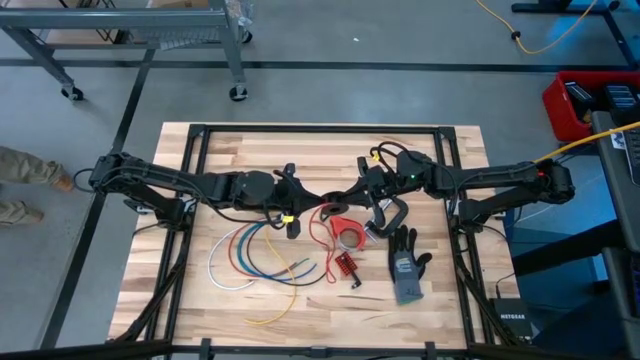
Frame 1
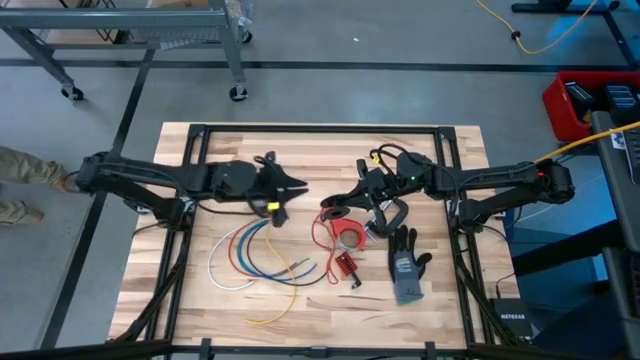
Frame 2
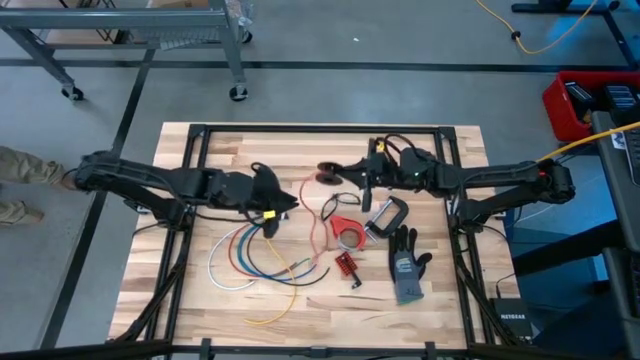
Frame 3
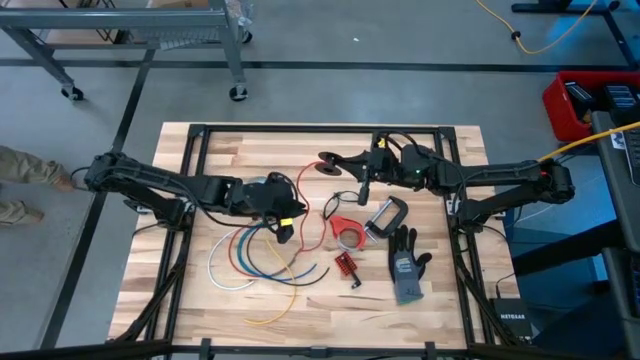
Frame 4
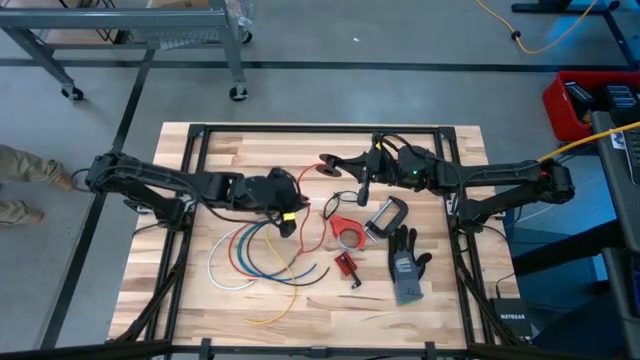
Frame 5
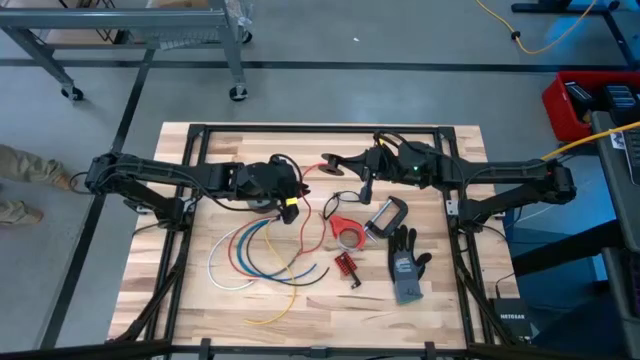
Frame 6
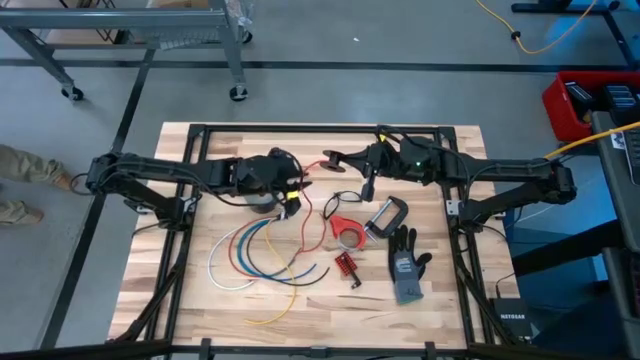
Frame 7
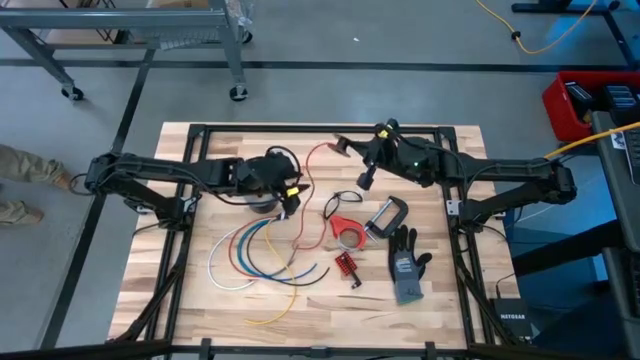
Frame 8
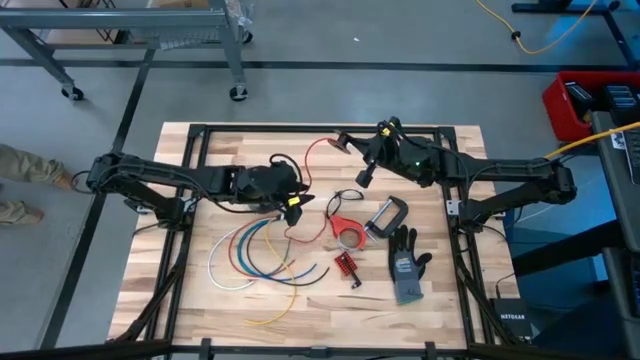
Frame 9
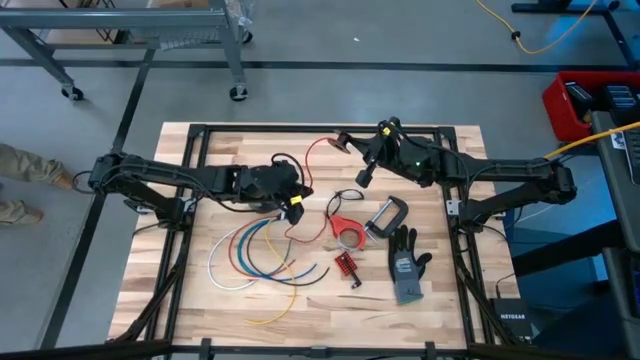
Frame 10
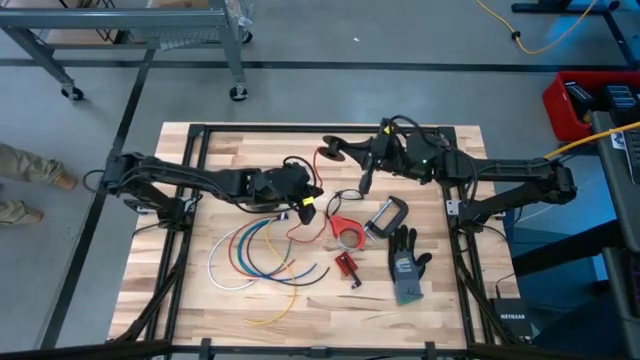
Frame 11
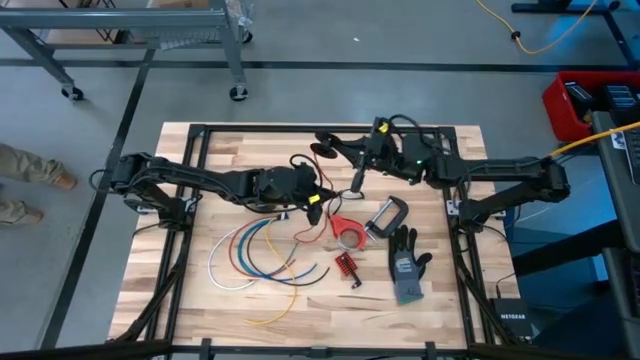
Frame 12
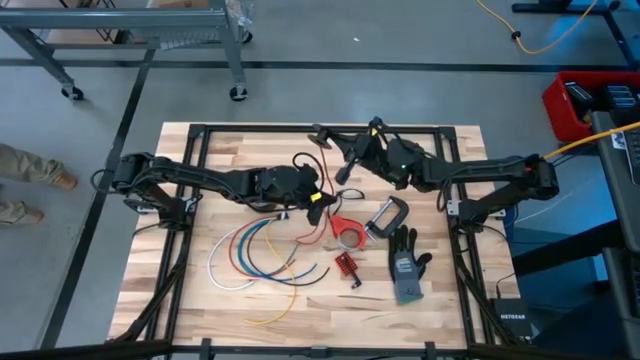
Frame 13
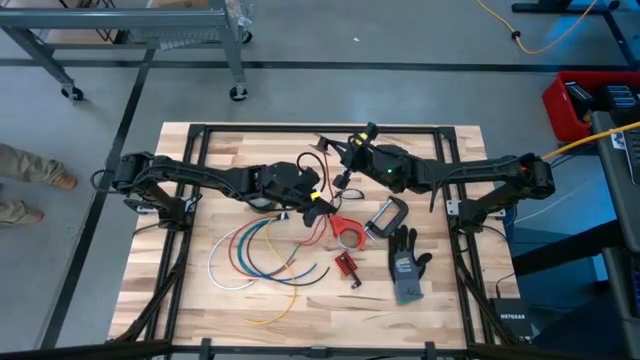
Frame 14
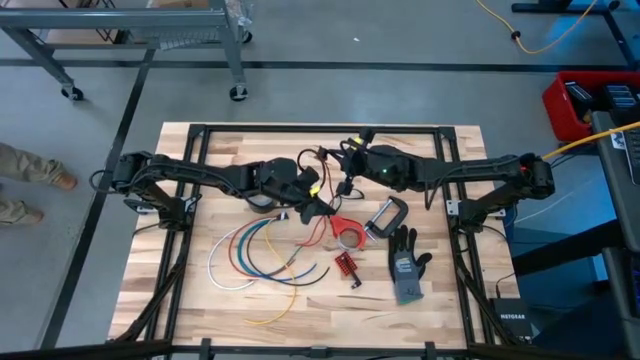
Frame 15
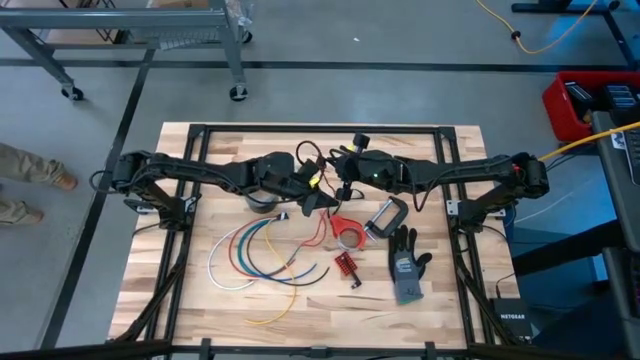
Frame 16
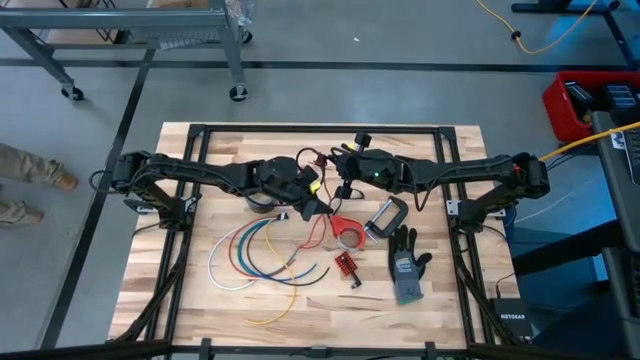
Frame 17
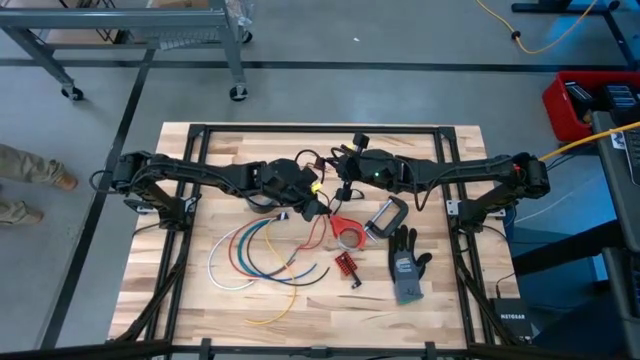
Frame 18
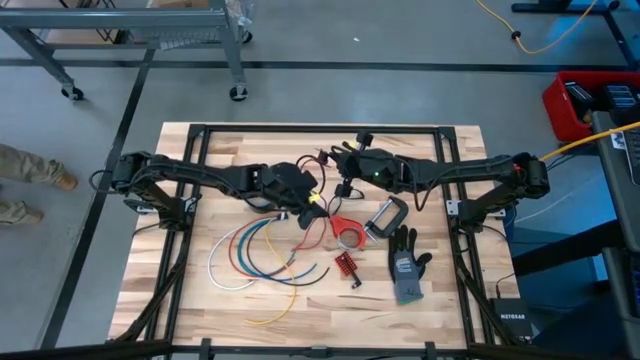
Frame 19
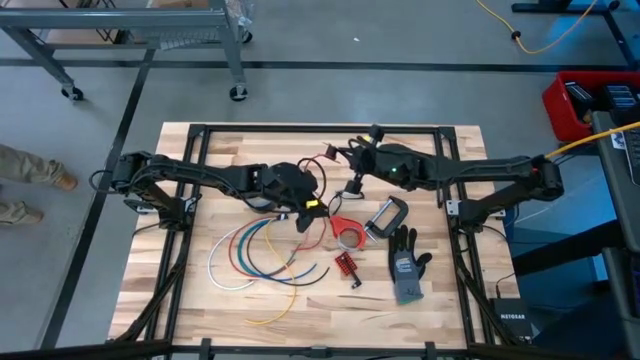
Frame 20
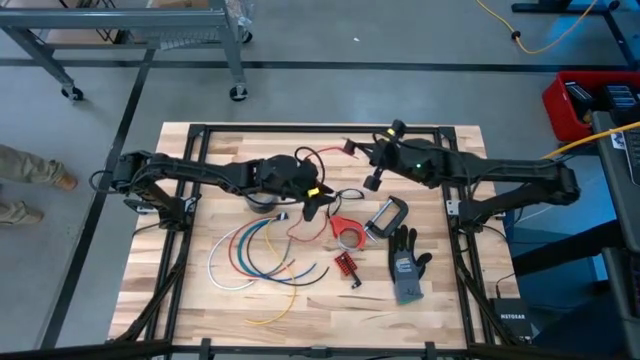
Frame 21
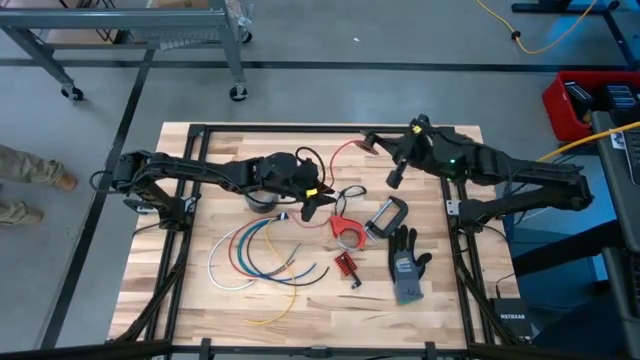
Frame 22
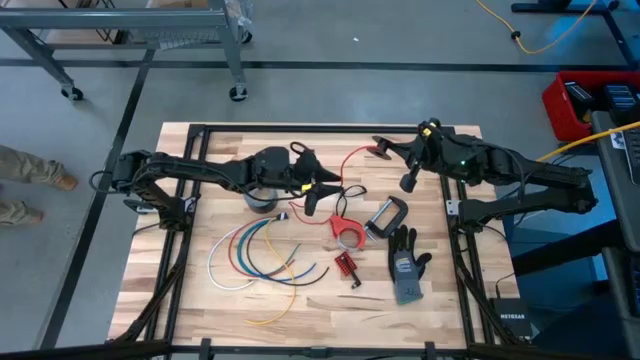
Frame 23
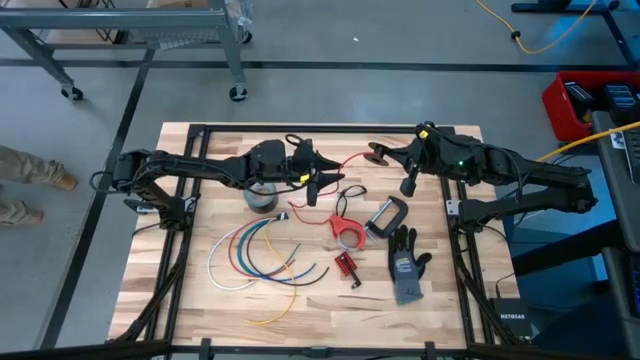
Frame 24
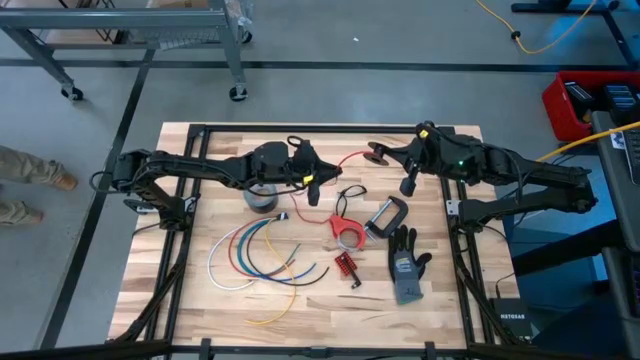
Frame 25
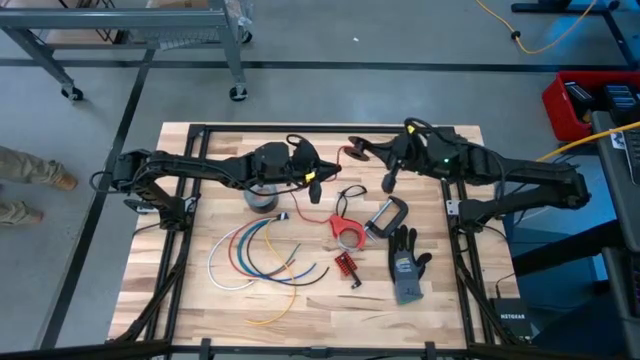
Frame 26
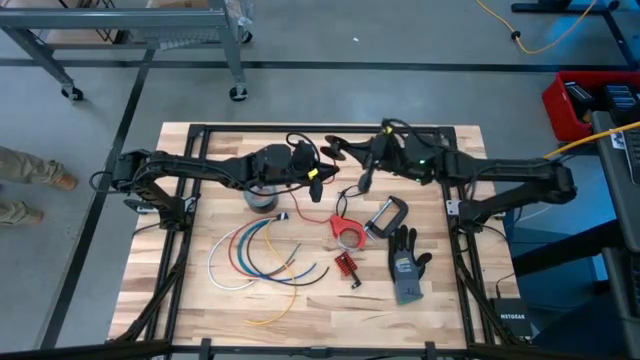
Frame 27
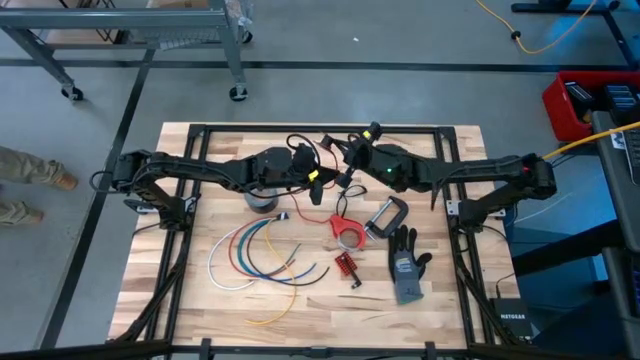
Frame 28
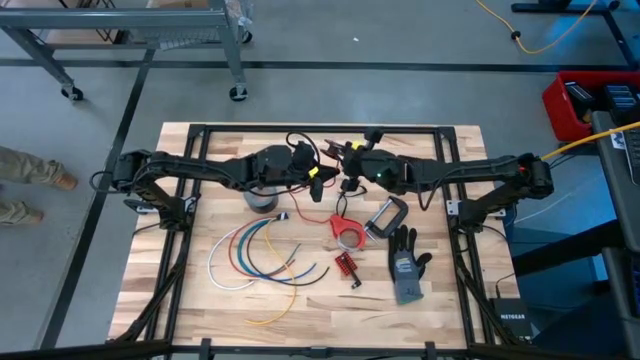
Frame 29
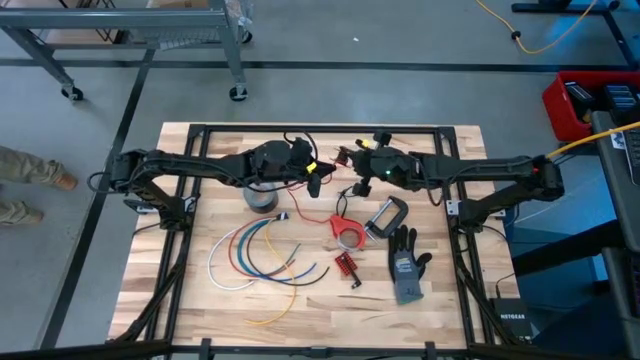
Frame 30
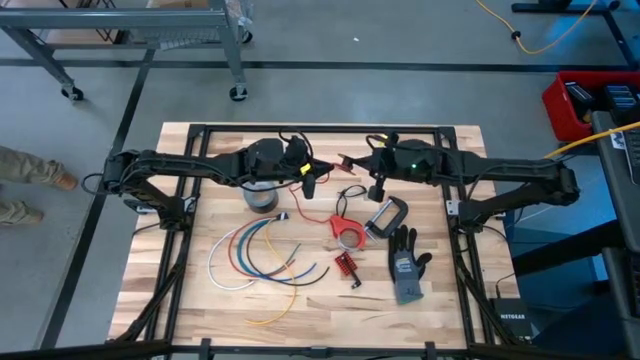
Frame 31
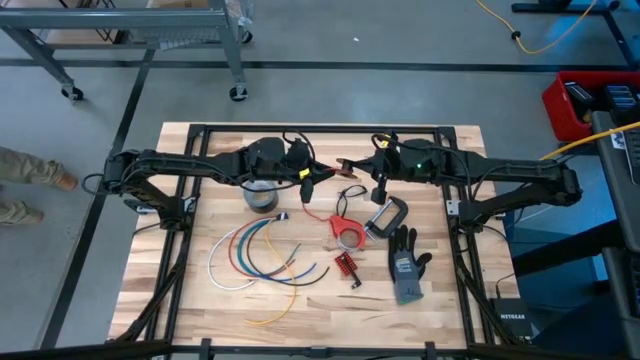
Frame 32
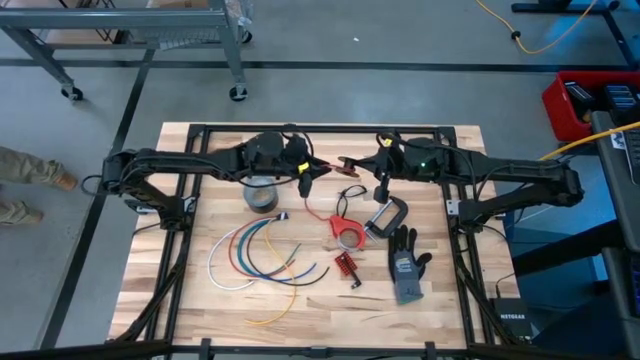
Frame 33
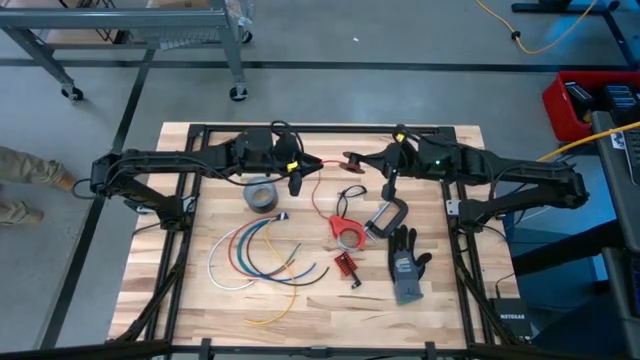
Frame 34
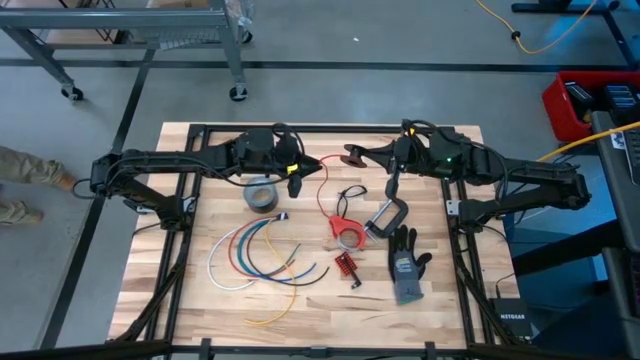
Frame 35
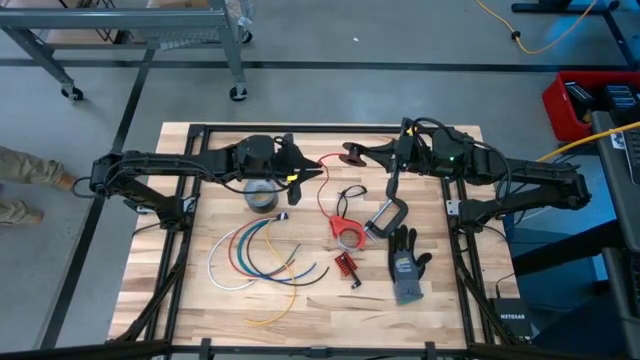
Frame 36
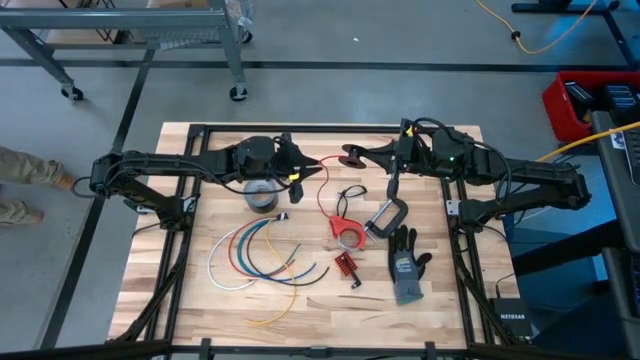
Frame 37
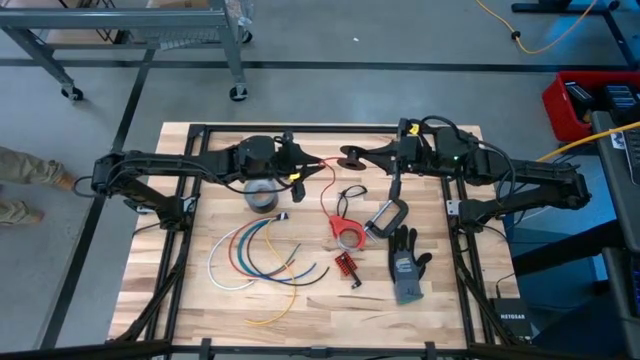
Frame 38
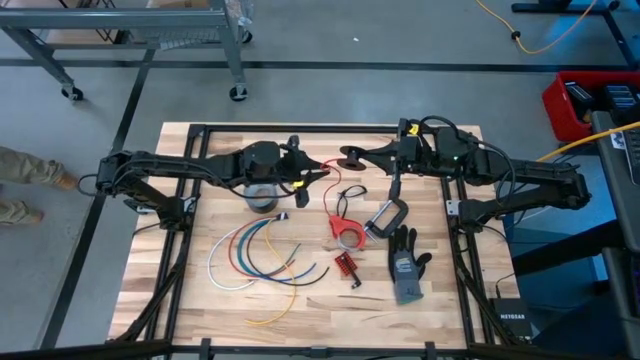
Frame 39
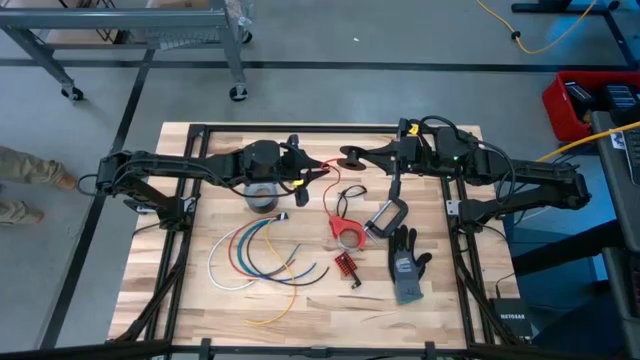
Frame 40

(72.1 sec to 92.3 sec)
Task: Coil cords
Coil the red wire onto the spool
